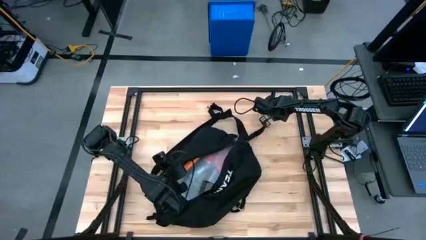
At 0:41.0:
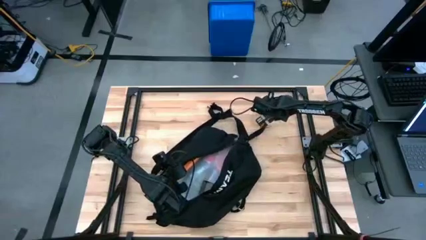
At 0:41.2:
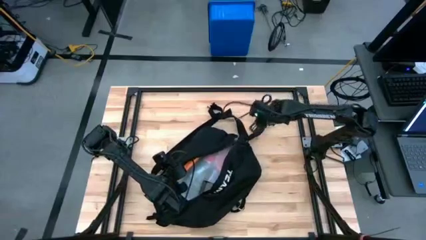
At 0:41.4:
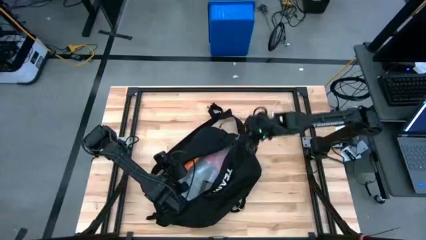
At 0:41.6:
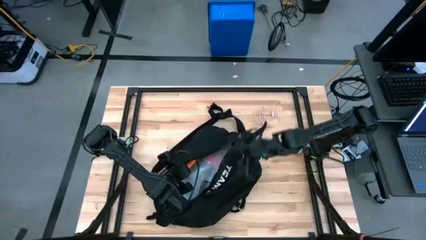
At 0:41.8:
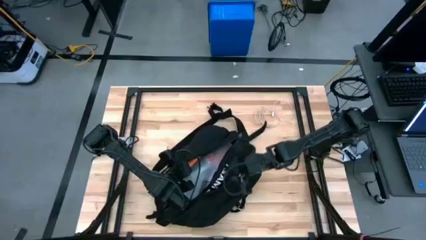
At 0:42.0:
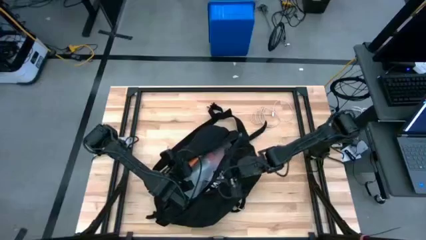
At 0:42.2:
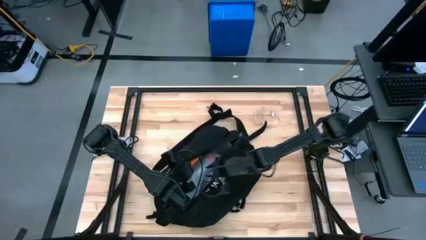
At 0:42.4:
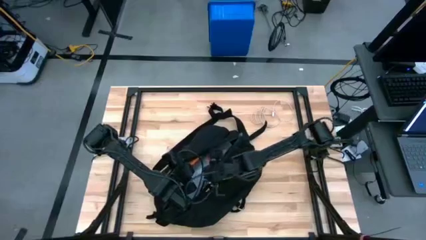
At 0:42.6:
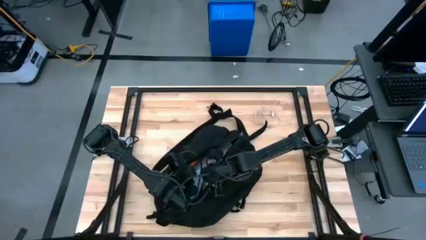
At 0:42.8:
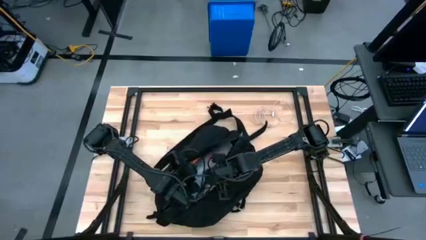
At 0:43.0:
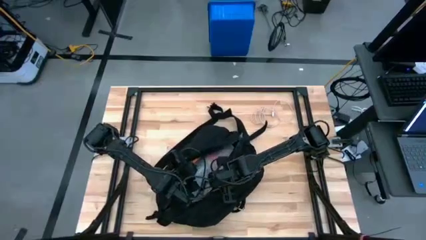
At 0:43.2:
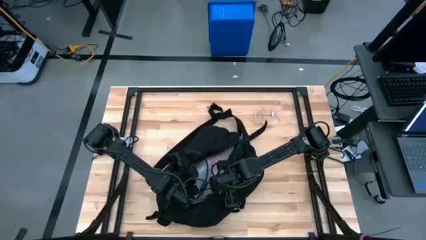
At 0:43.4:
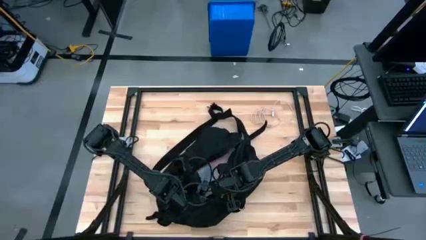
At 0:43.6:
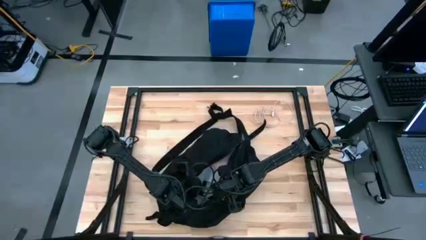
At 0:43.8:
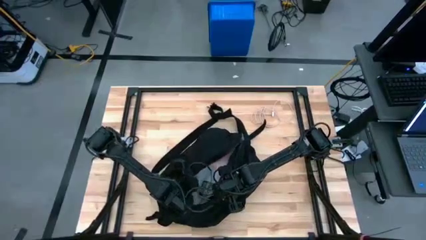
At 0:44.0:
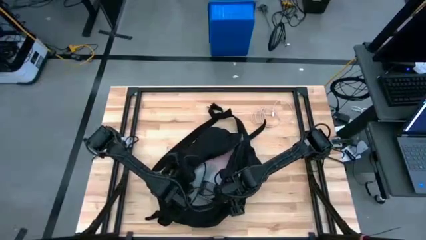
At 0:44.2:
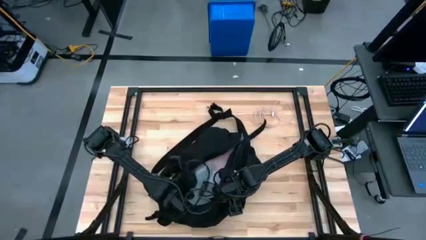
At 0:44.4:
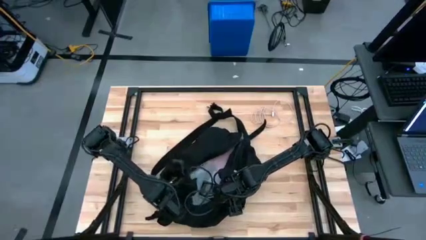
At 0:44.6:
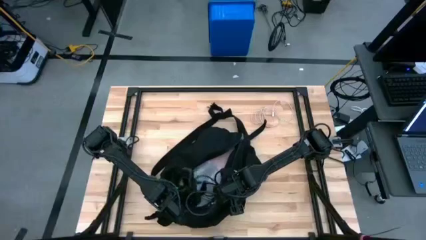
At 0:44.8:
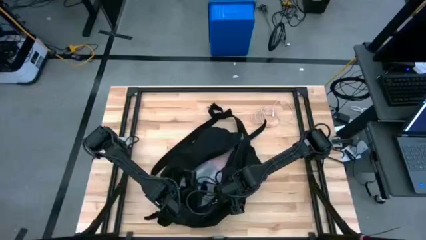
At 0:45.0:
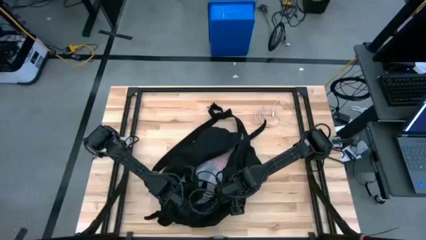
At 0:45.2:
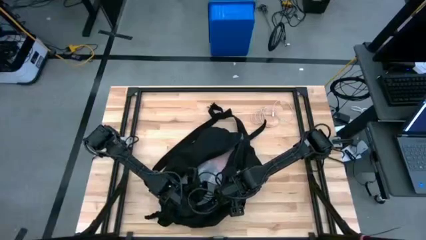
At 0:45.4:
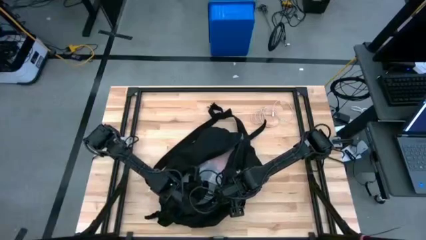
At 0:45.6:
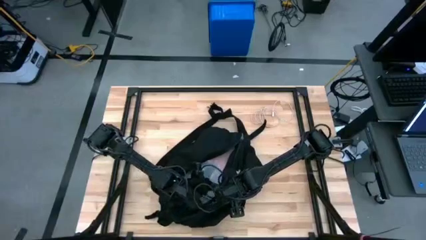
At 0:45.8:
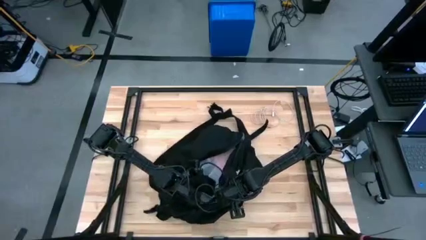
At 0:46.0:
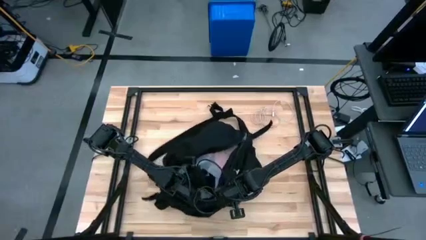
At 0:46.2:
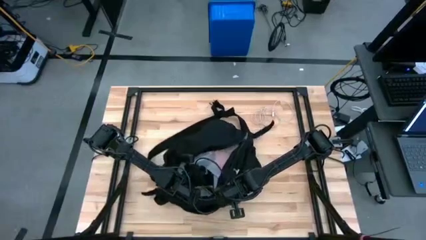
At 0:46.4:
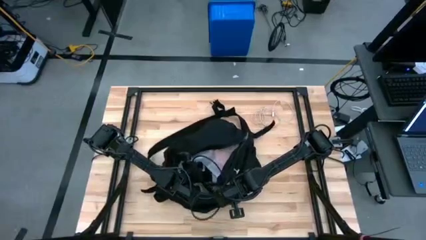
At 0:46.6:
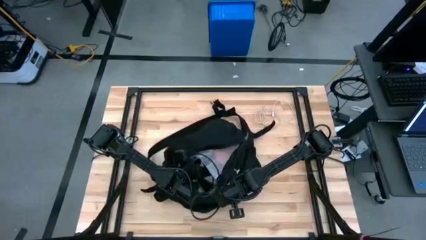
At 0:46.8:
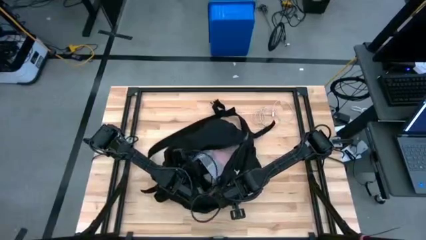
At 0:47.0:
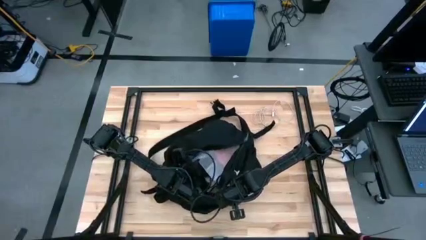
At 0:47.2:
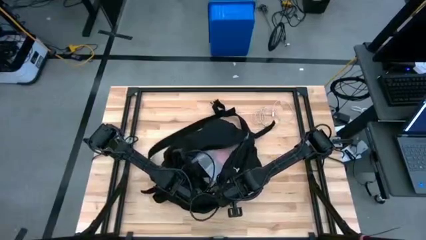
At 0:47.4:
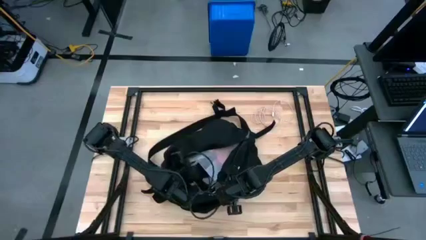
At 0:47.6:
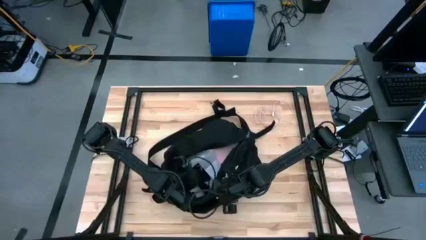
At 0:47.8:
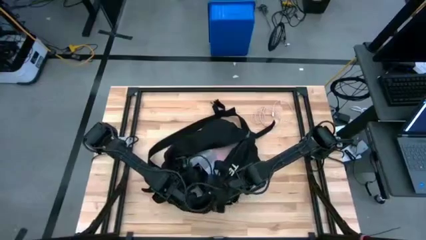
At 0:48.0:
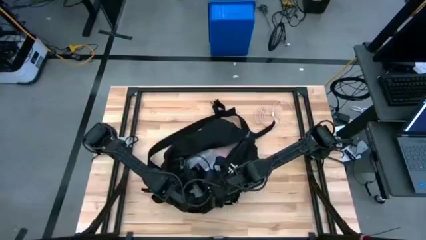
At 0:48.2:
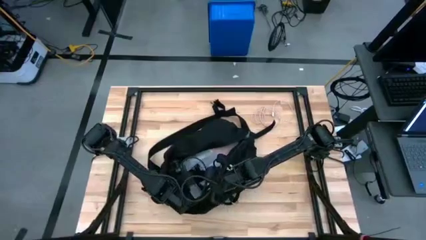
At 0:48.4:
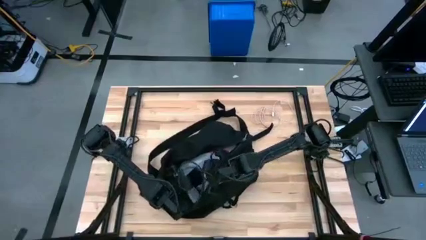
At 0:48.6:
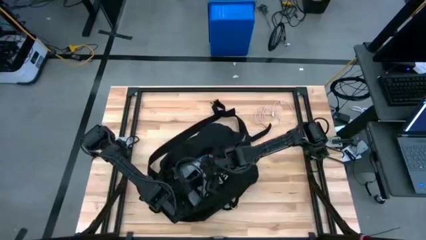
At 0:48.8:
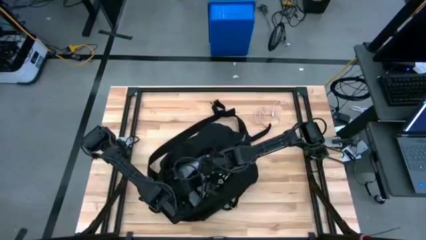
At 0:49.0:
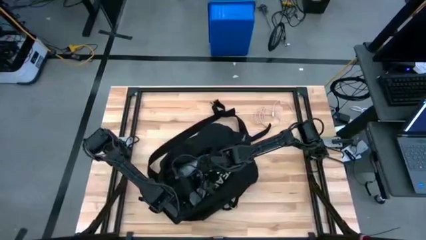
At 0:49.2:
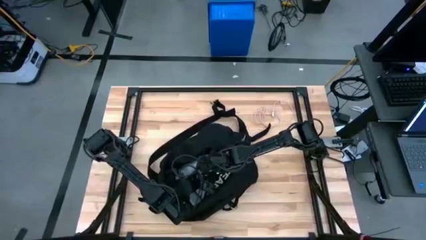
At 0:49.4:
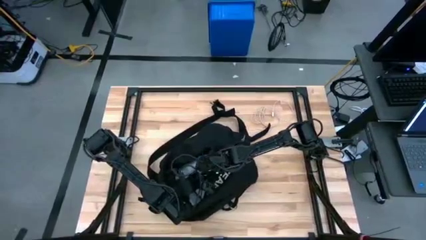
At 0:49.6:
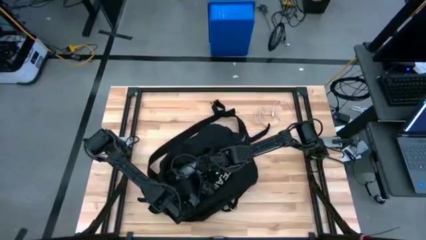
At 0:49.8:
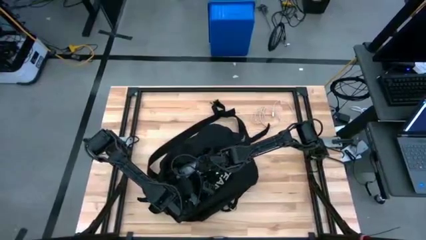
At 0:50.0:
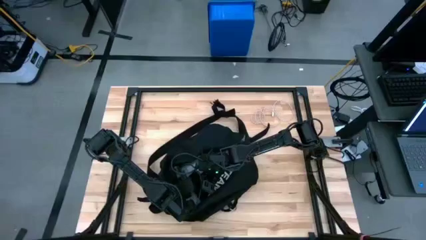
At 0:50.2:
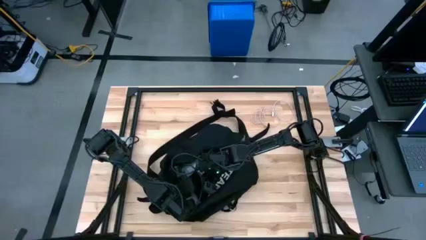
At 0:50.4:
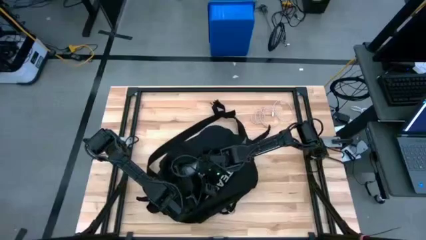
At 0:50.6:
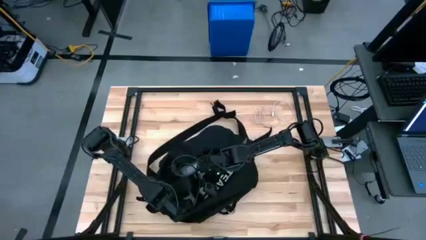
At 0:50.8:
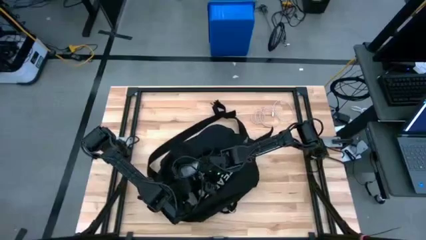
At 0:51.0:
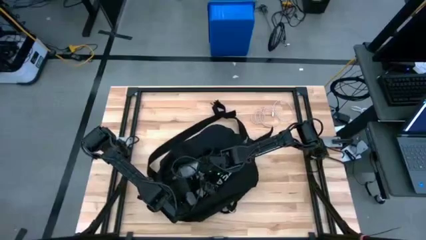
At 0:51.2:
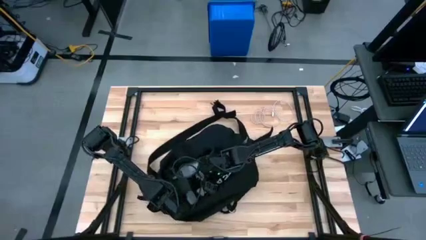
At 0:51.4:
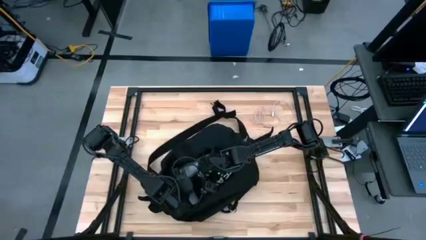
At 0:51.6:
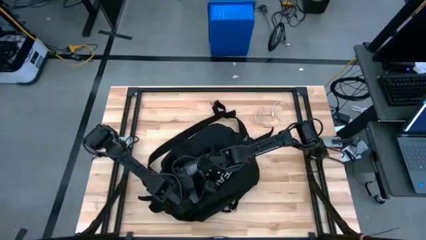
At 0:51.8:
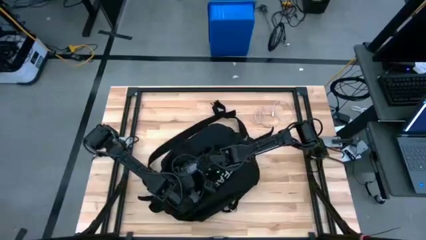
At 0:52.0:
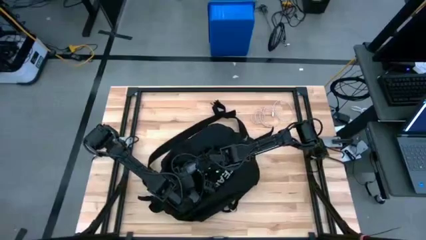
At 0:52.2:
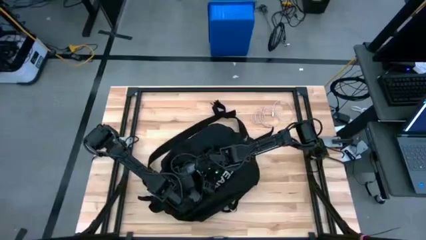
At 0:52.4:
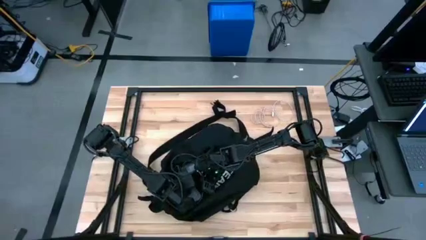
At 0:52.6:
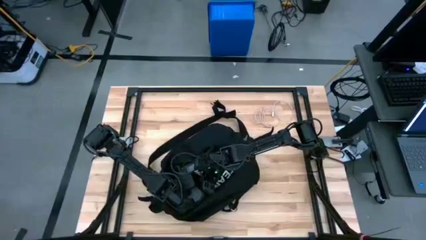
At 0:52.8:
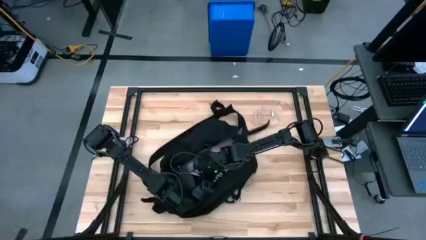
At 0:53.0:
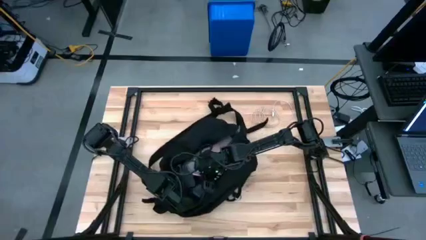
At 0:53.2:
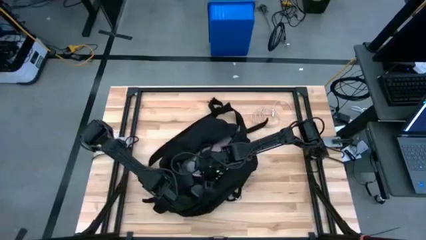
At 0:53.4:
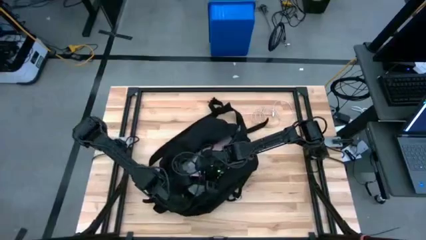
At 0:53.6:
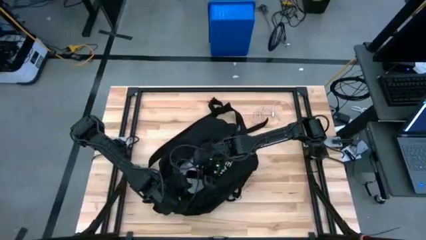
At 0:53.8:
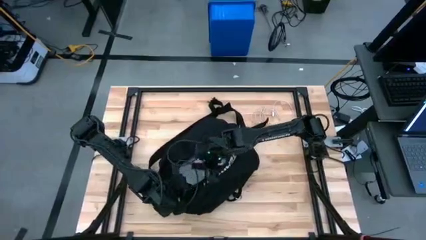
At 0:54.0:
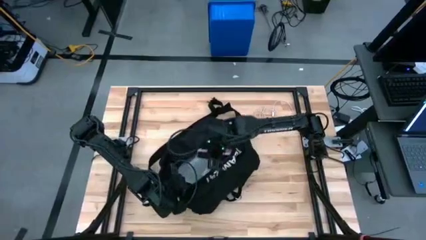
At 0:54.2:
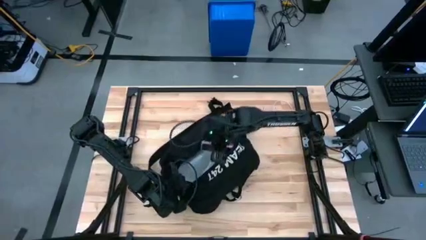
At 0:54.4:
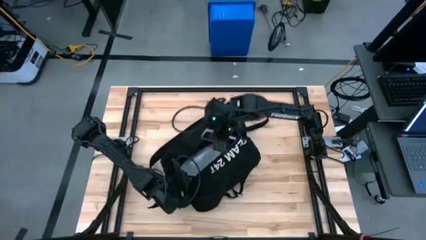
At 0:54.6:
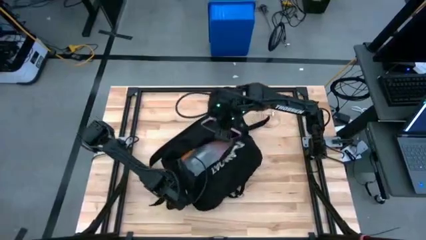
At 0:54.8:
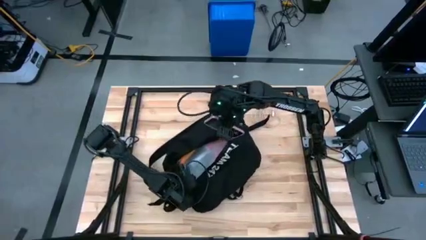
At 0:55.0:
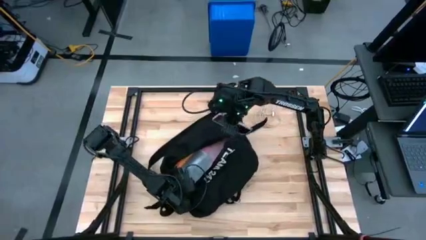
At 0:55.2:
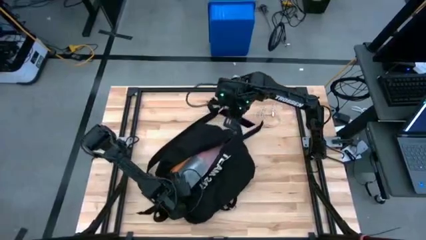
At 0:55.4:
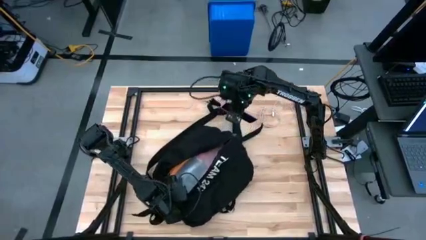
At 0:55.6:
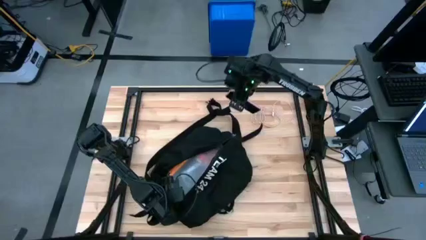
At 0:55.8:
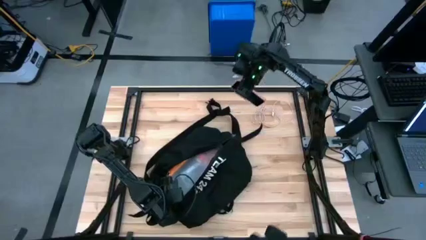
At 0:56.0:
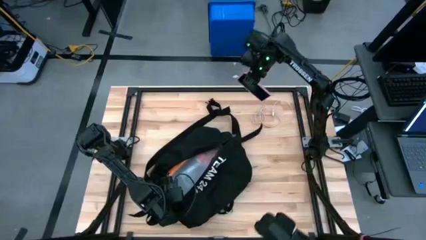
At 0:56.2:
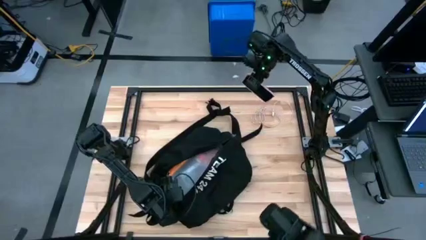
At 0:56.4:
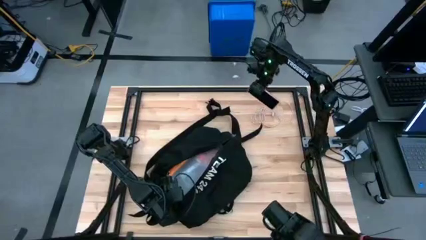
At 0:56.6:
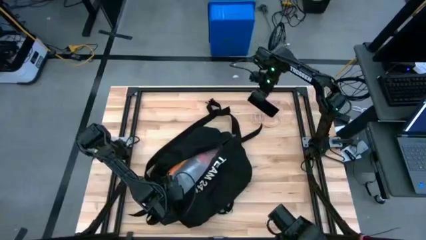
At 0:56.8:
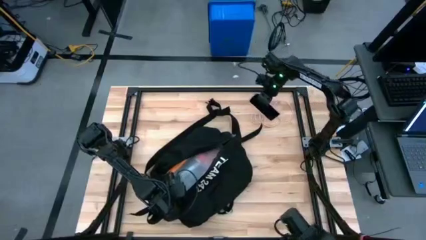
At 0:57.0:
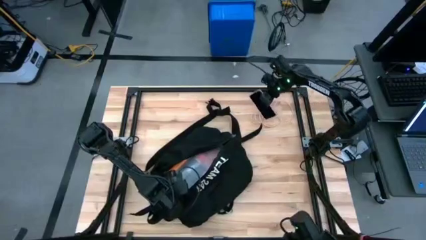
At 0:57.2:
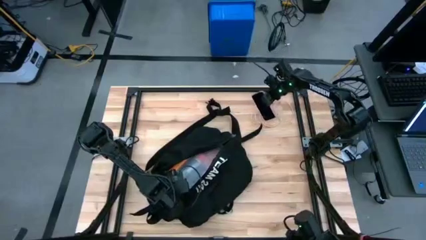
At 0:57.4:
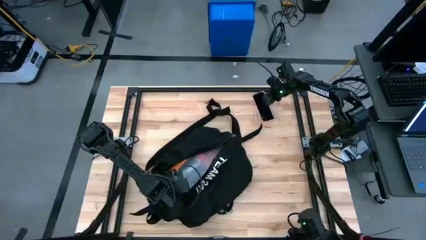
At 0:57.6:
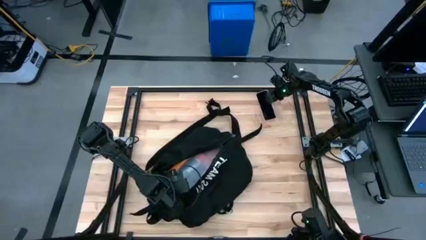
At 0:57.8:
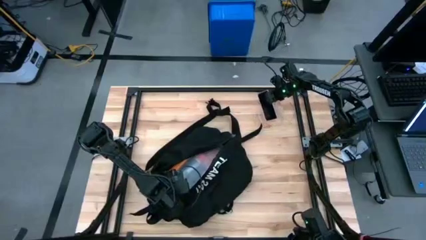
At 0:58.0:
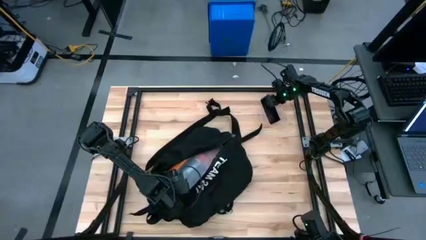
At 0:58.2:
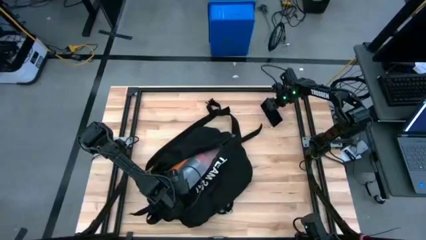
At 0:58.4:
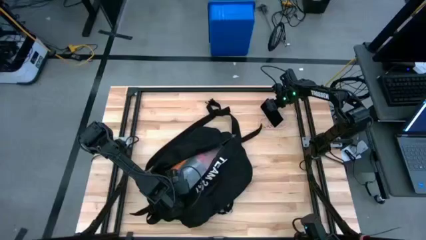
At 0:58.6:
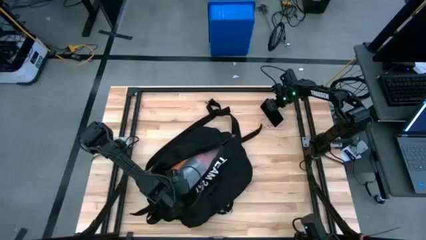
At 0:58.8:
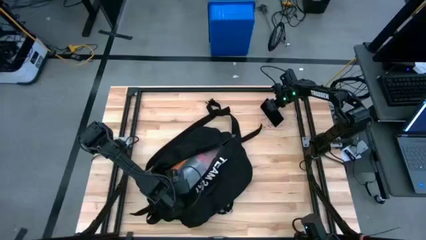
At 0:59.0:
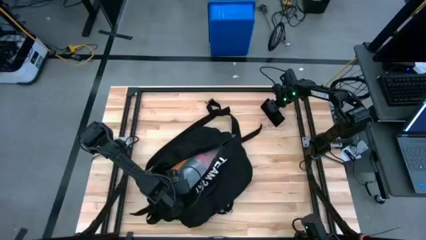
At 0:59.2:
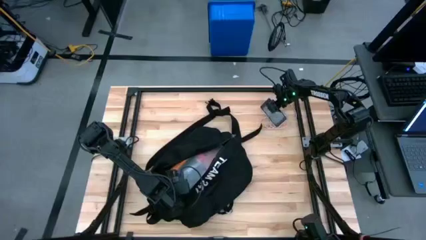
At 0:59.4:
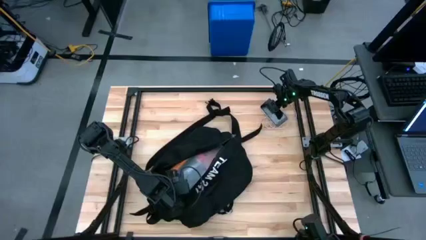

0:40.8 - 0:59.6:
Task: Unpack backpack
Remove the pink cellphone from the black backpack
